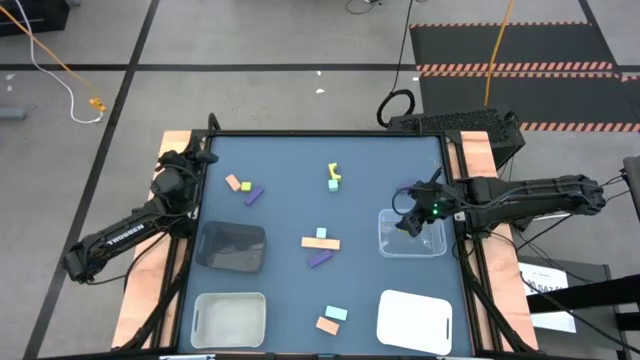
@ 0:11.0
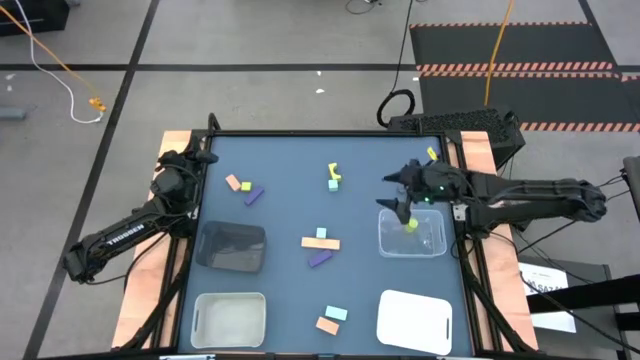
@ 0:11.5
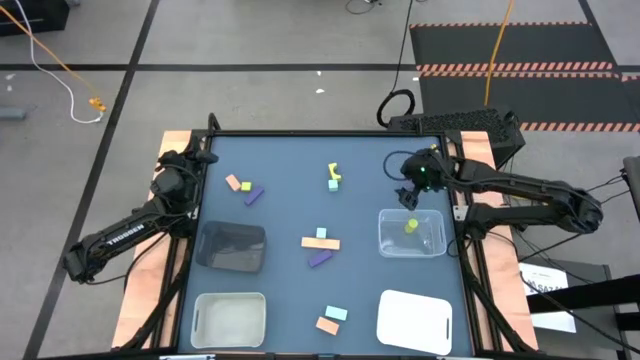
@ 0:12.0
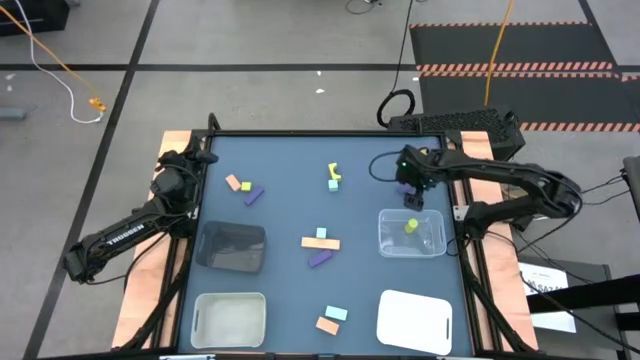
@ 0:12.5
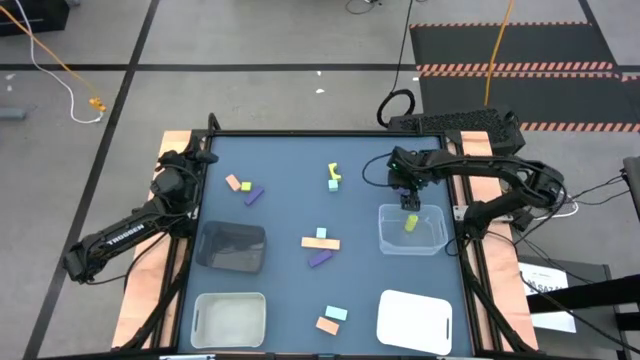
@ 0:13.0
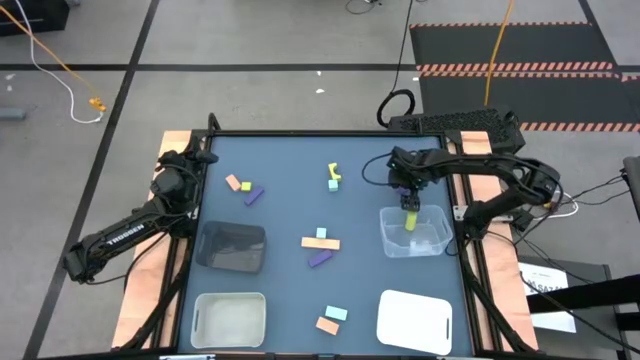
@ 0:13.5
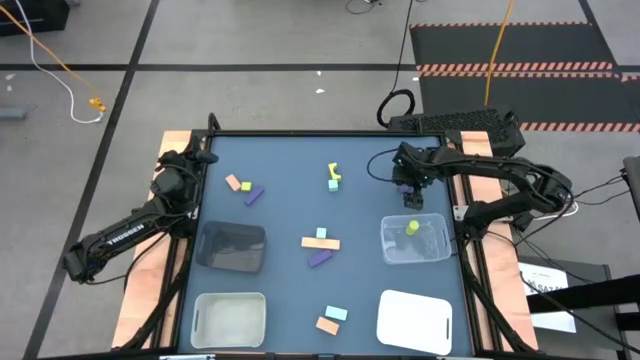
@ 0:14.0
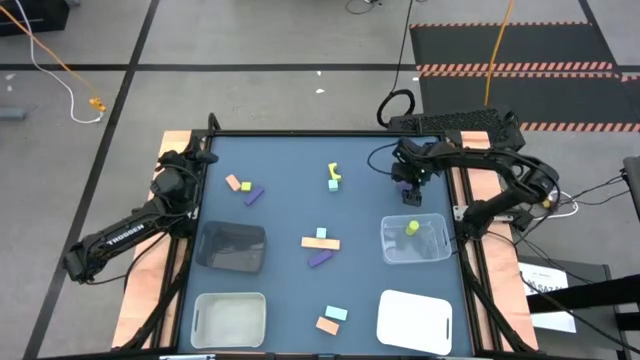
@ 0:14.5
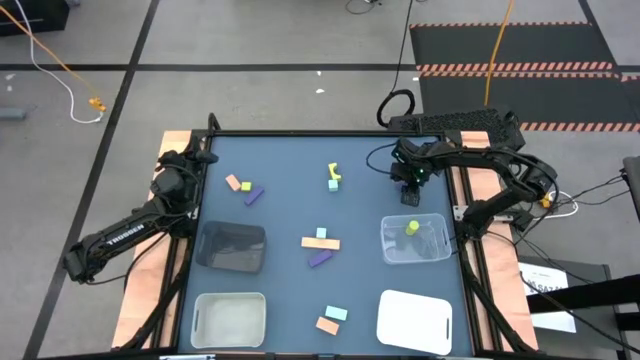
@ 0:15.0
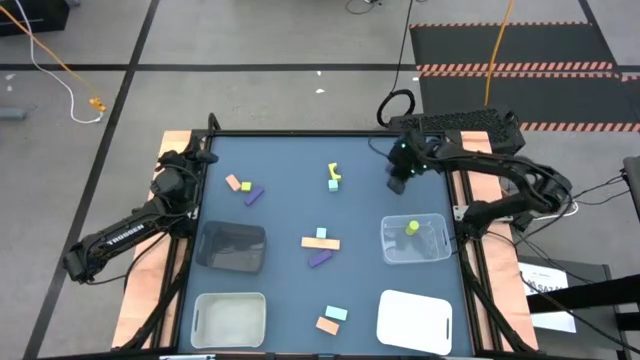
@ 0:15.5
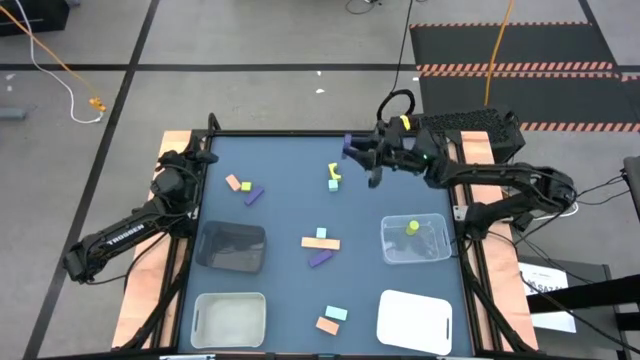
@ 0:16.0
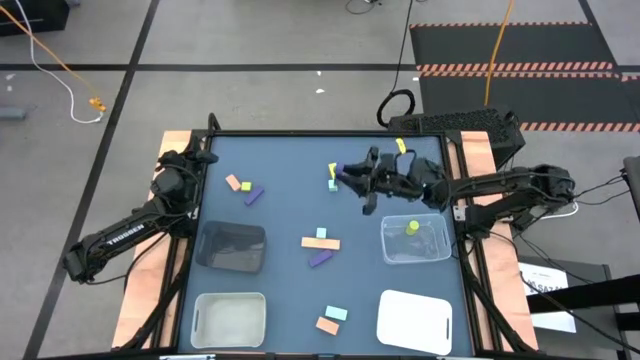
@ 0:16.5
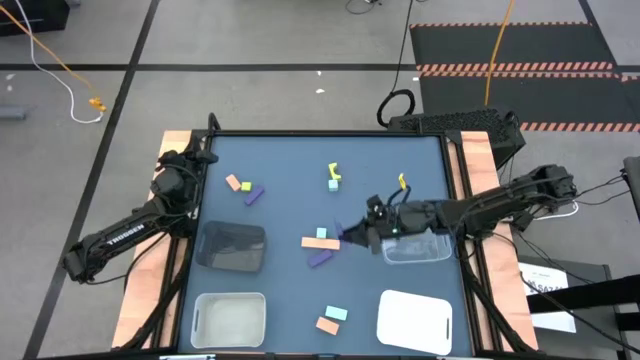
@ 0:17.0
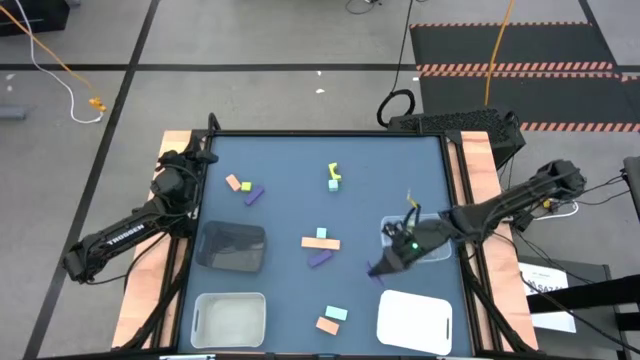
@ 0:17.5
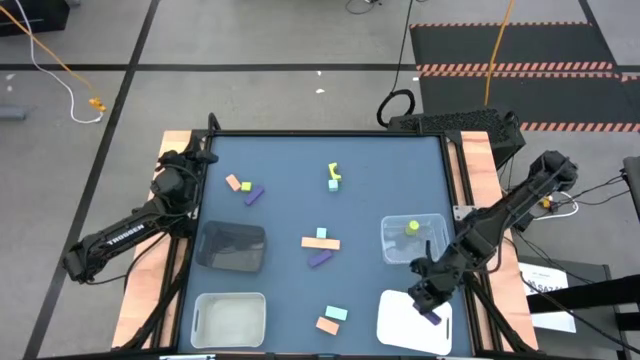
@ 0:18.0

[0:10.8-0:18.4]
Task: Sort & place blocks by color
Put the top right violet block into the white bin

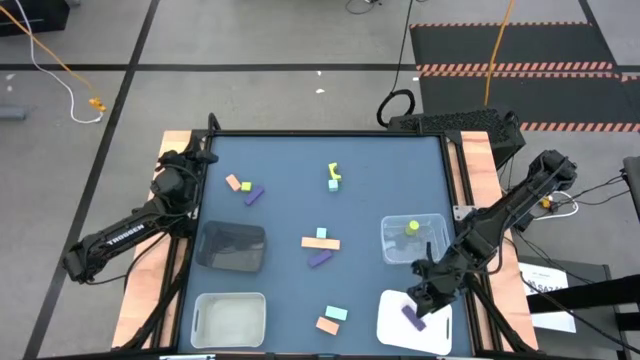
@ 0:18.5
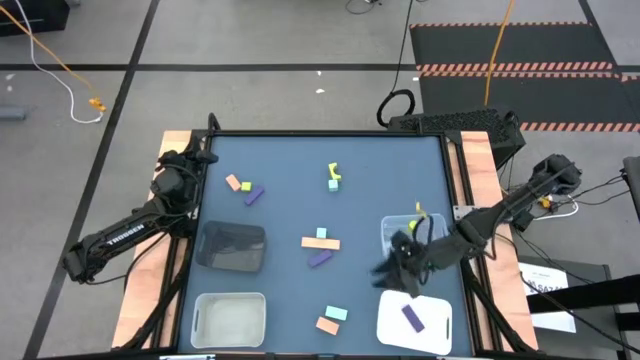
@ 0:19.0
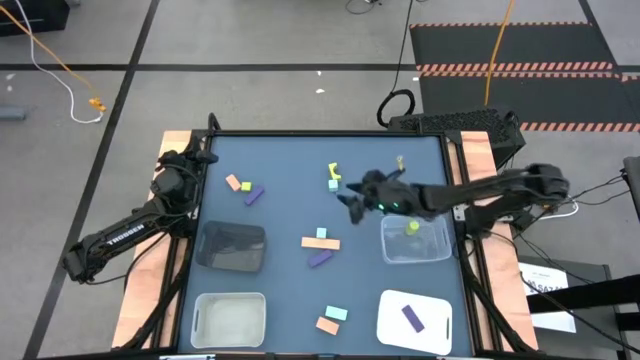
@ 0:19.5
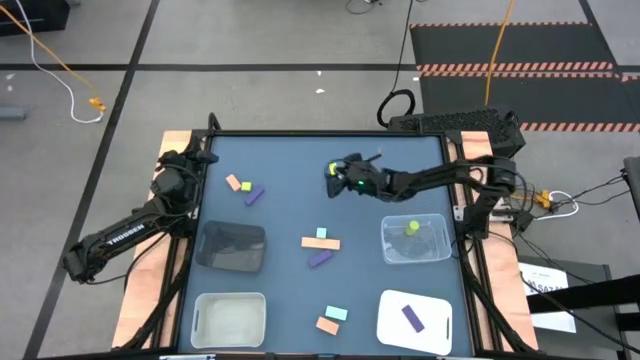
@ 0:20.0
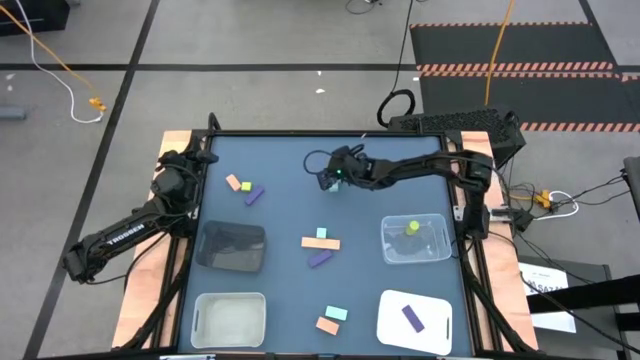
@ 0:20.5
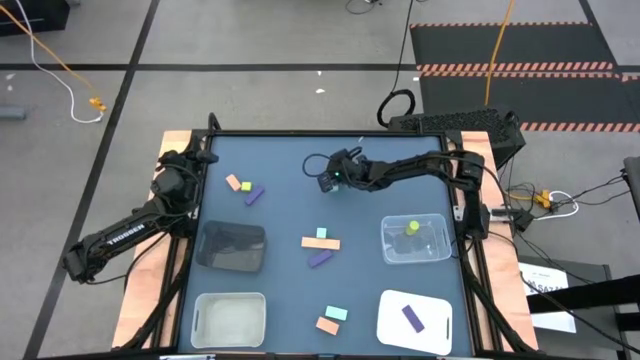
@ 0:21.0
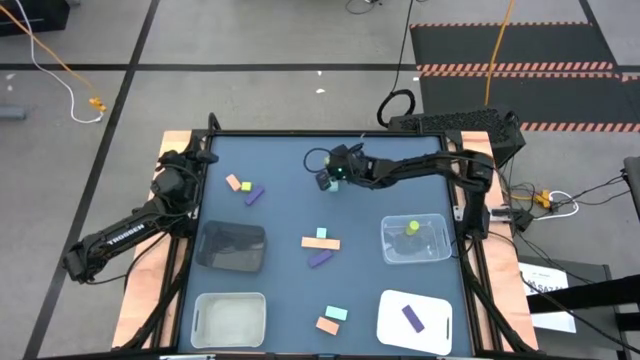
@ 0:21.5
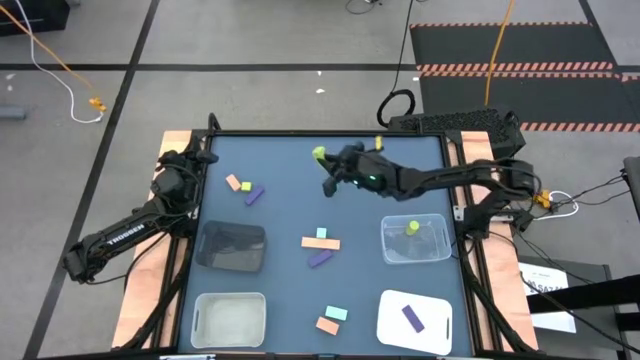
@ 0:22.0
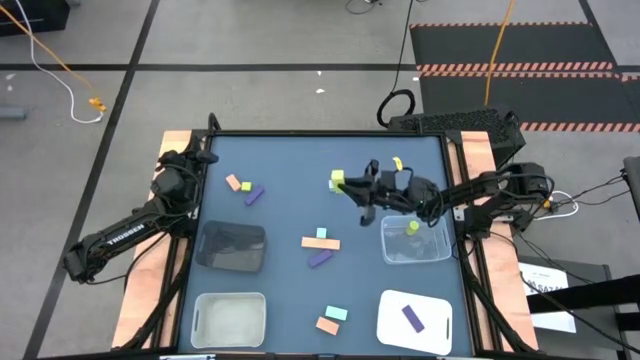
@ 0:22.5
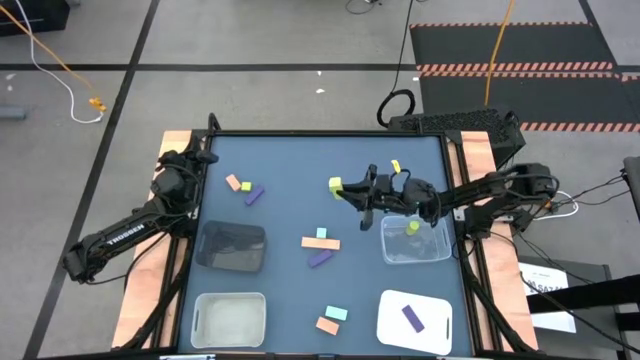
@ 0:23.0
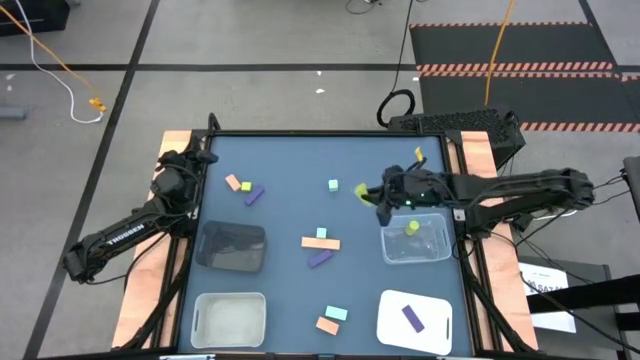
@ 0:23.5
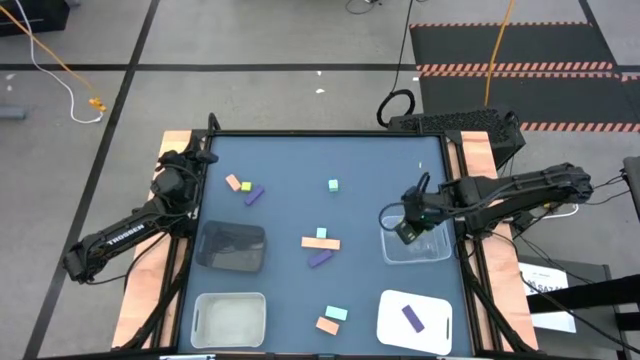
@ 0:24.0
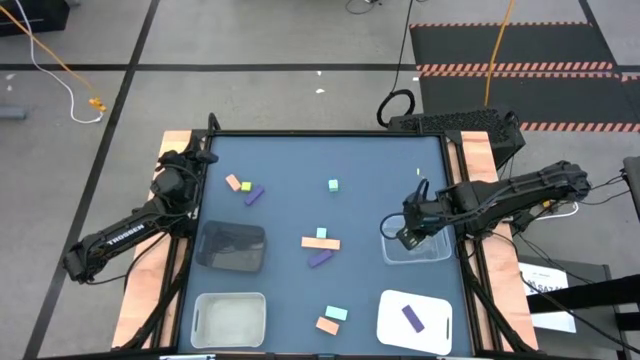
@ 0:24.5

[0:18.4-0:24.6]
Put the right green block into the transparent bin

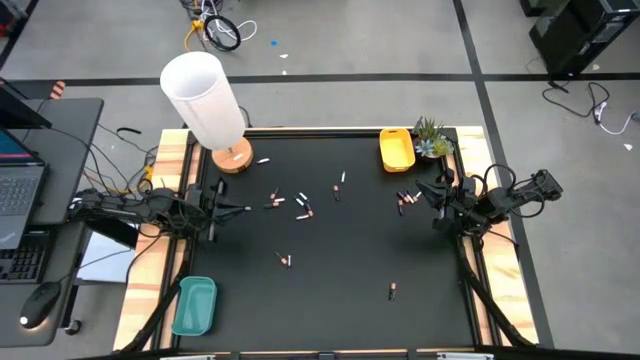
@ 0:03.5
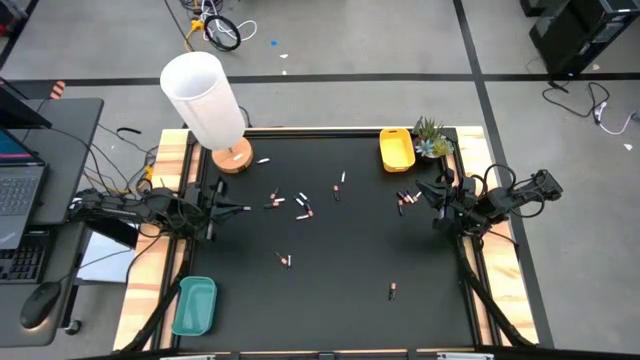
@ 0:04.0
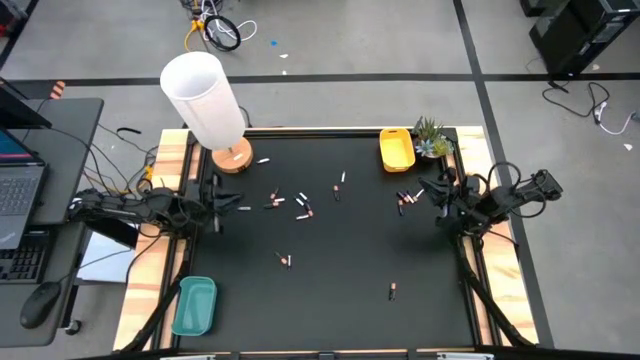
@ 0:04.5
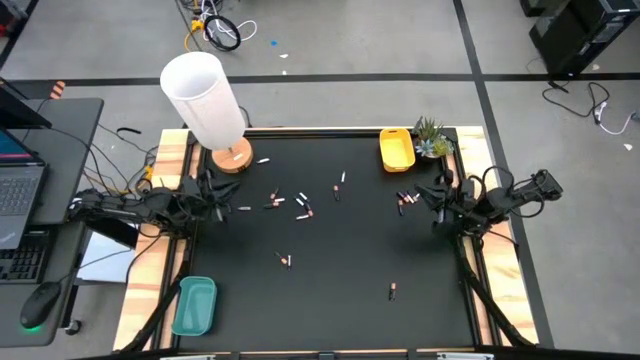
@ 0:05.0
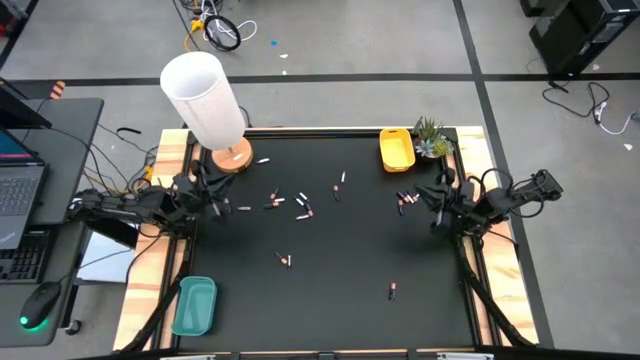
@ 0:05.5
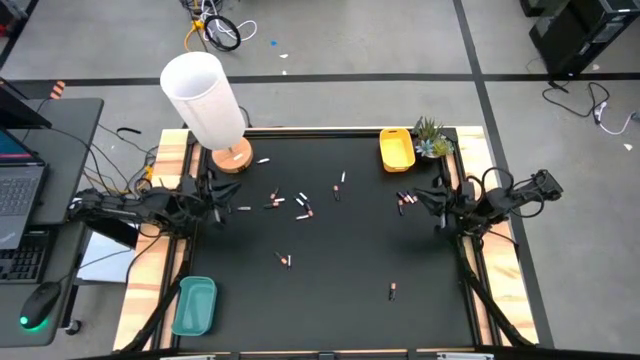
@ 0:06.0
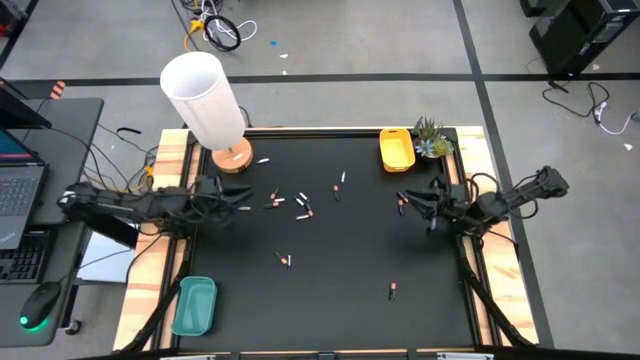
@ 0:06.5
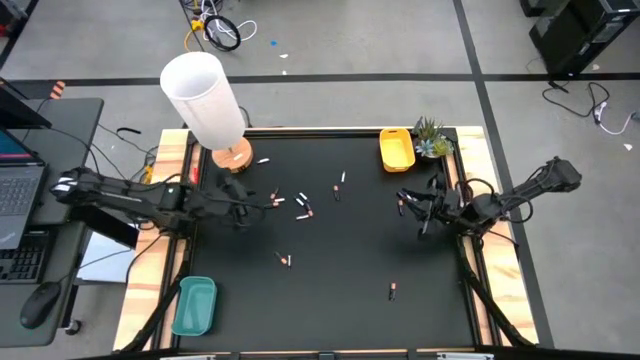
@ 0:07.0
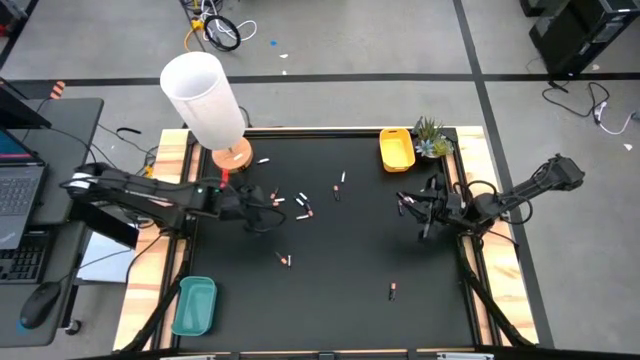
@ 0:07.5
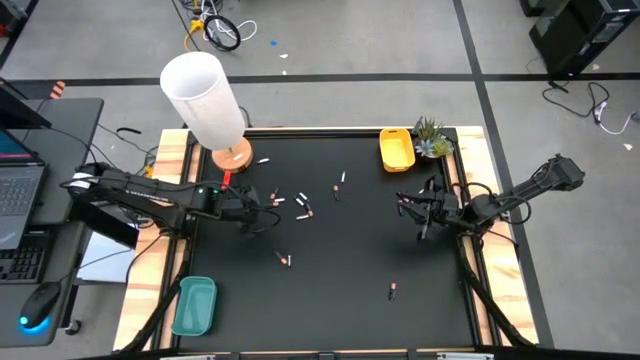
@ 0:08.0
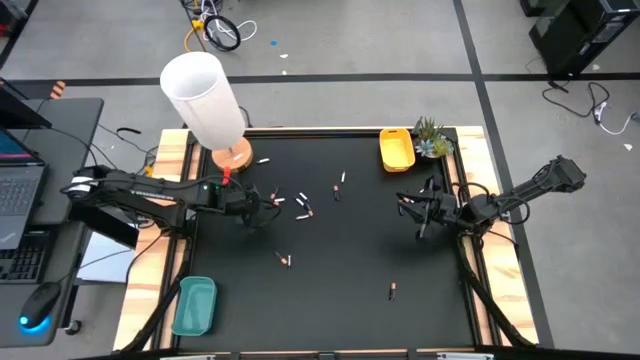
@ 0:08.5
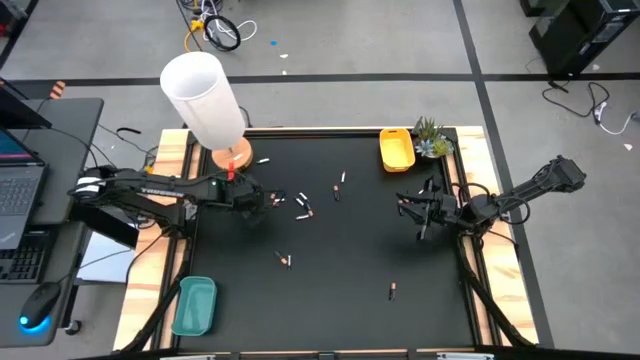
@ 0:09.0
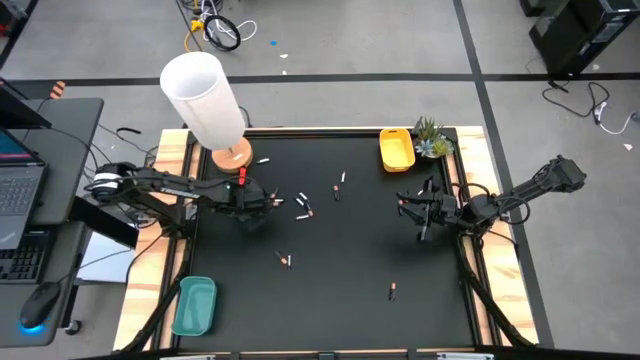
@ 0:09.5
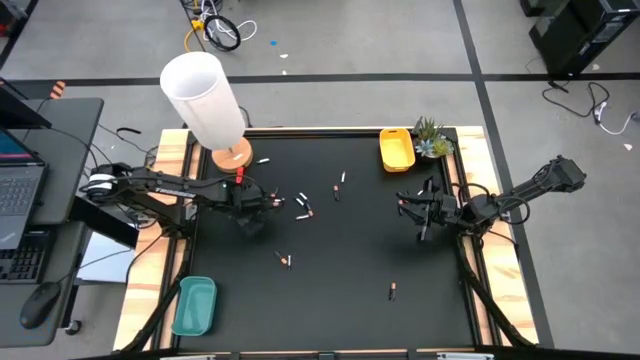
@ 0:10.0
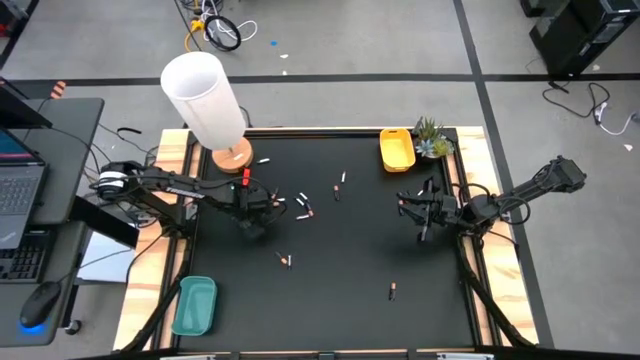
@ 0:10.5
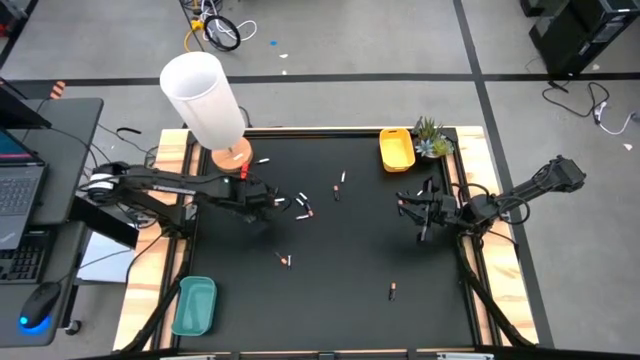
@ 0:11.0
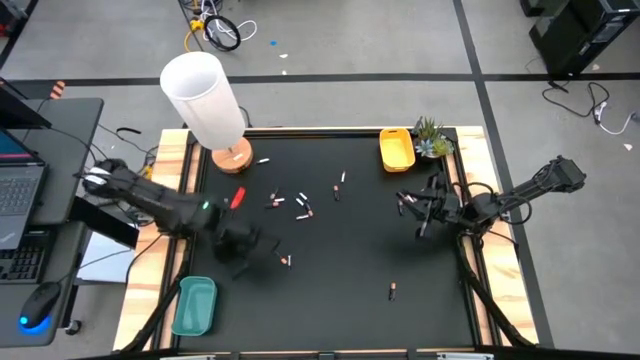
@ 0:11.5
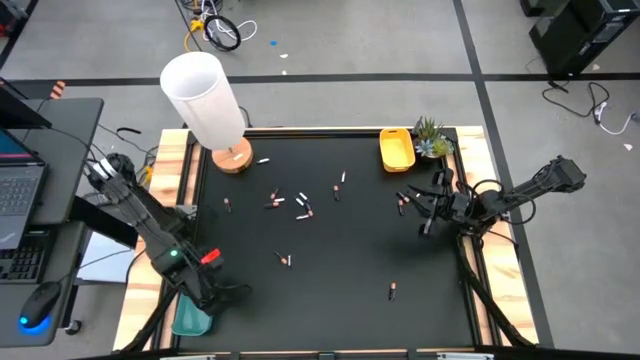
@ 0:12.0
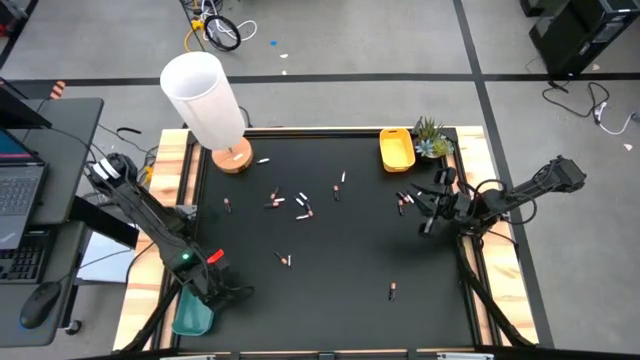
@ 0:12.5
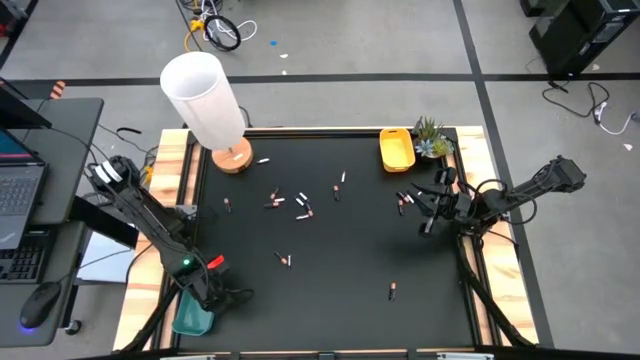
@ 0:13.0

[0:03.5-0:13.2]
Task: Sort batteries
Put the silver battery into the blue bin
